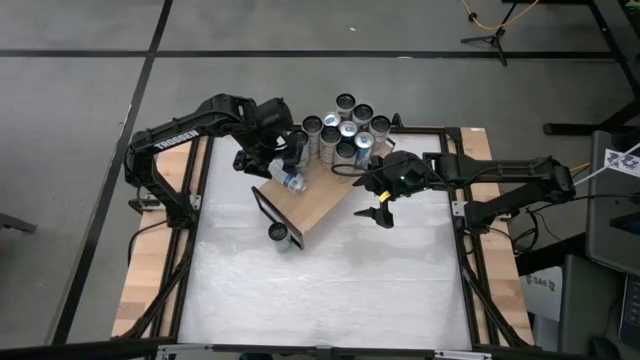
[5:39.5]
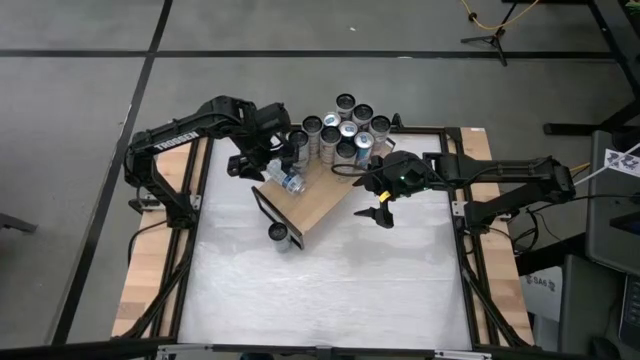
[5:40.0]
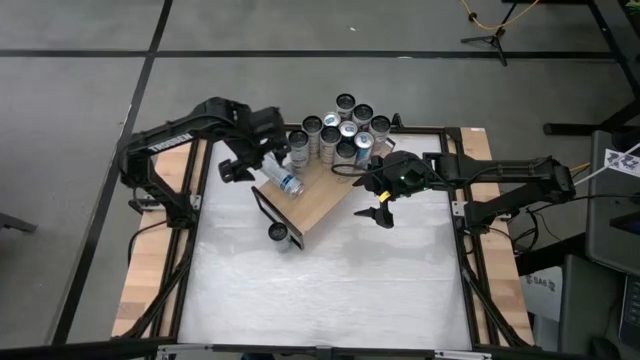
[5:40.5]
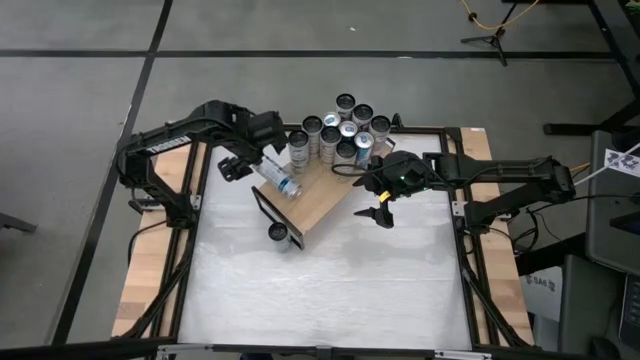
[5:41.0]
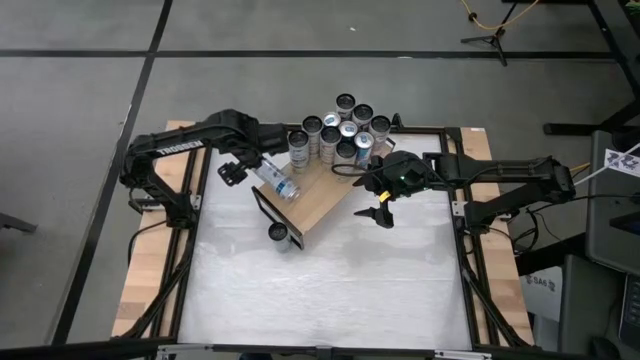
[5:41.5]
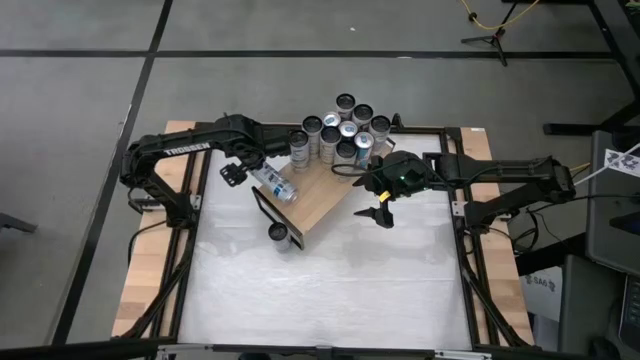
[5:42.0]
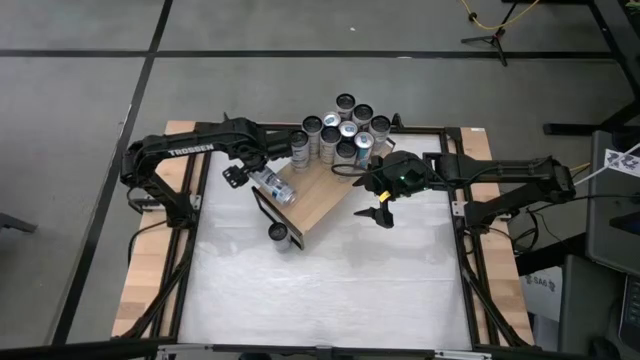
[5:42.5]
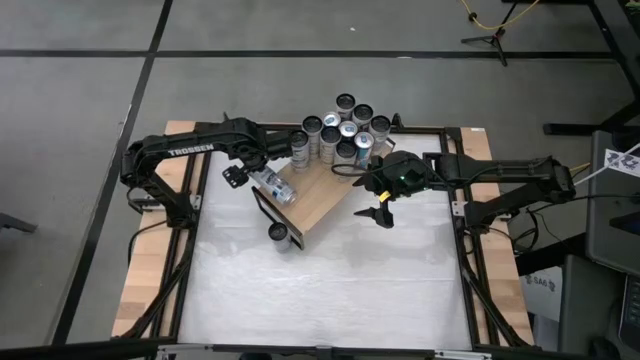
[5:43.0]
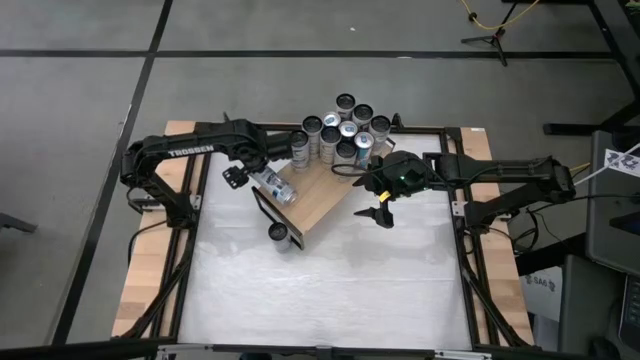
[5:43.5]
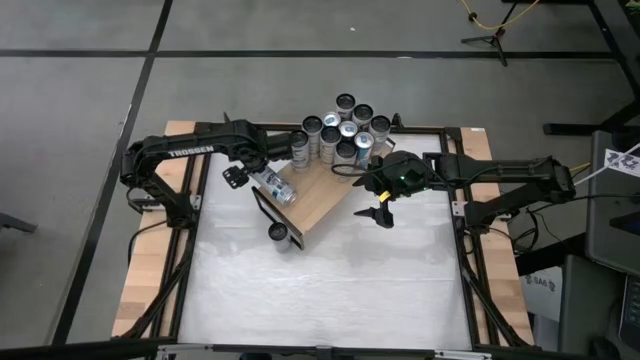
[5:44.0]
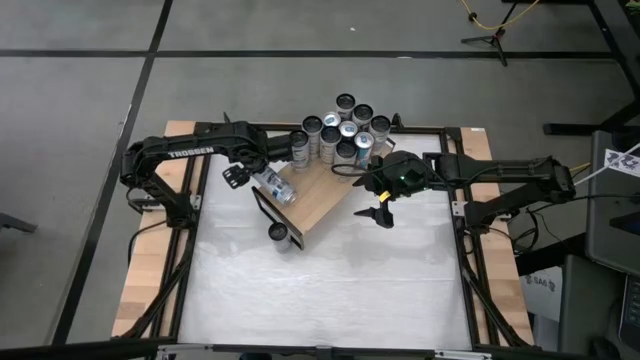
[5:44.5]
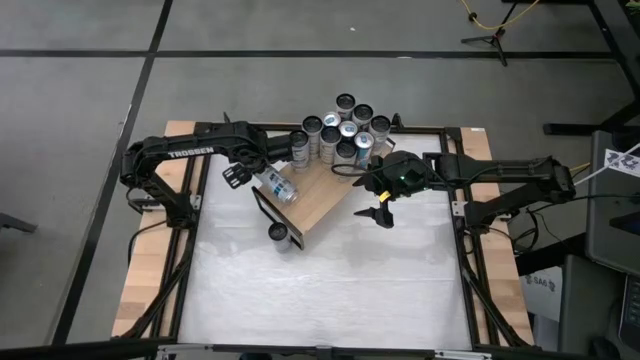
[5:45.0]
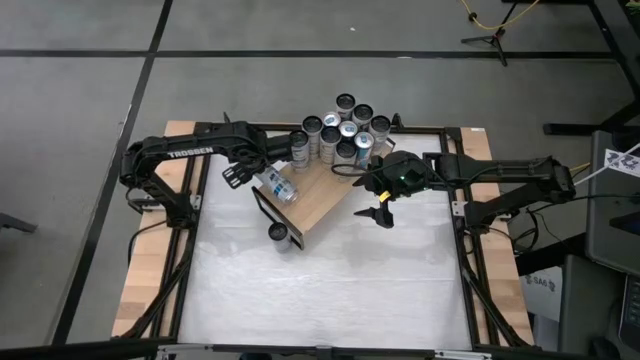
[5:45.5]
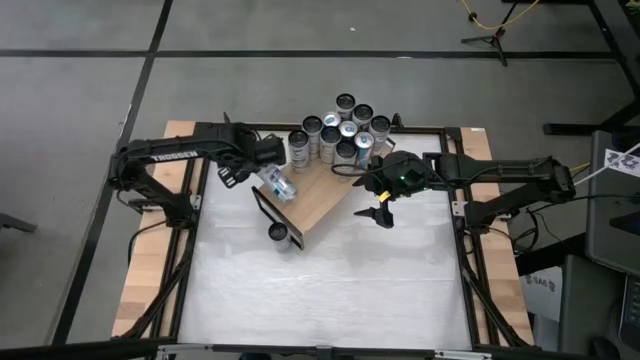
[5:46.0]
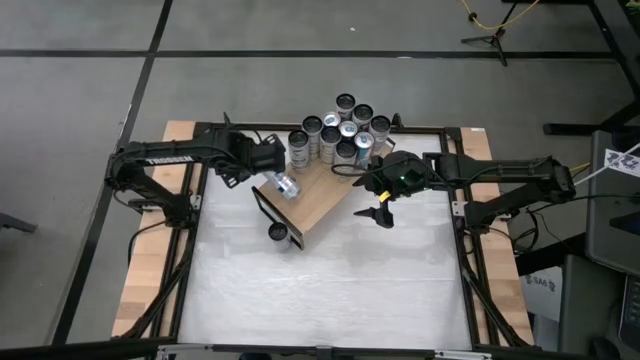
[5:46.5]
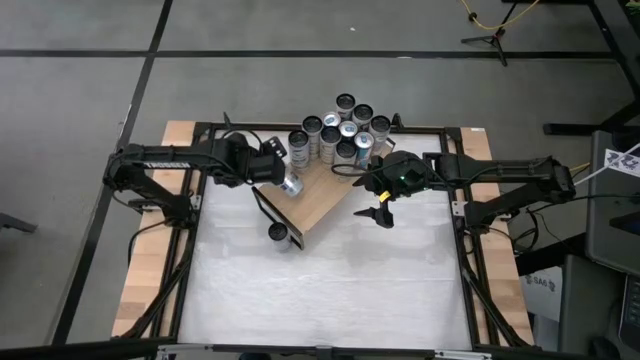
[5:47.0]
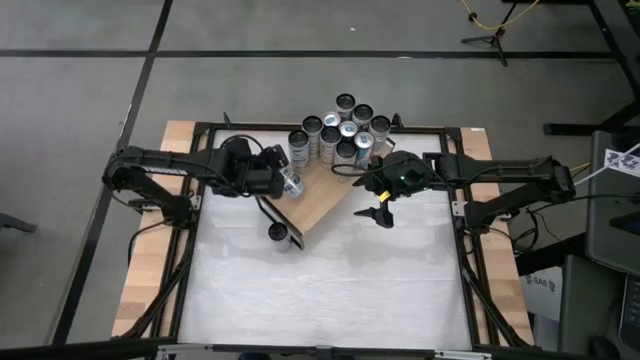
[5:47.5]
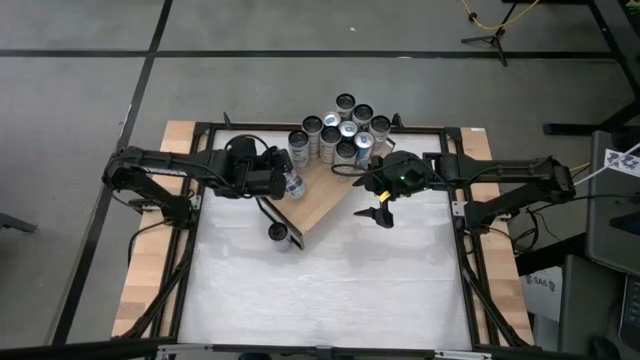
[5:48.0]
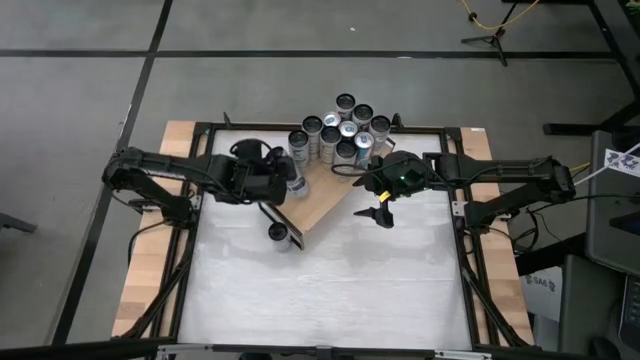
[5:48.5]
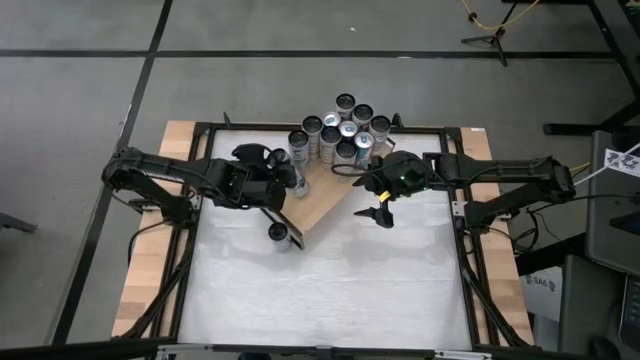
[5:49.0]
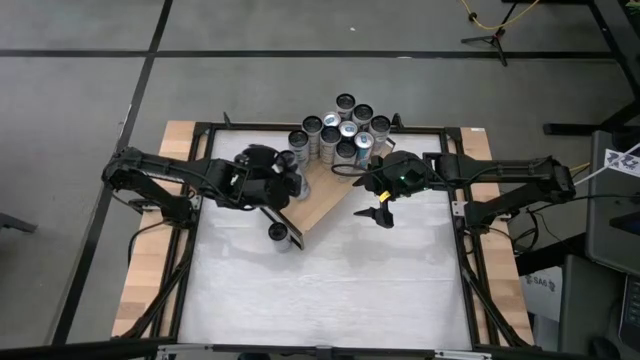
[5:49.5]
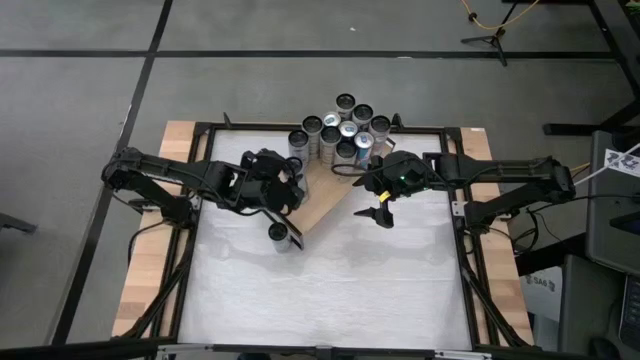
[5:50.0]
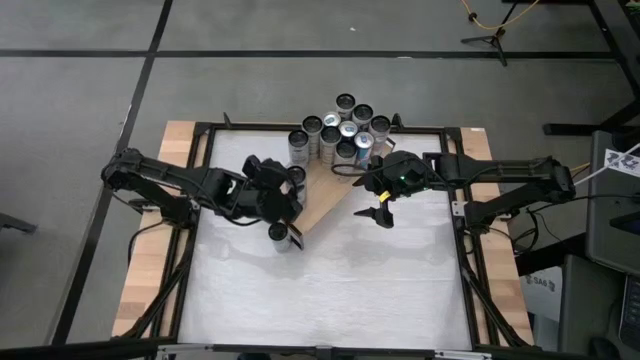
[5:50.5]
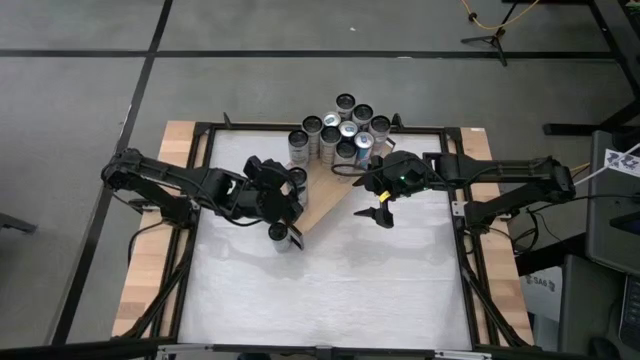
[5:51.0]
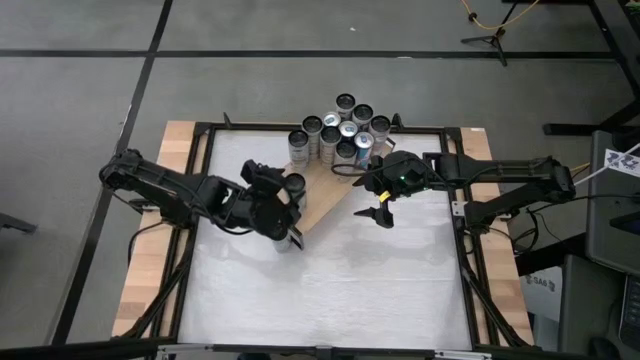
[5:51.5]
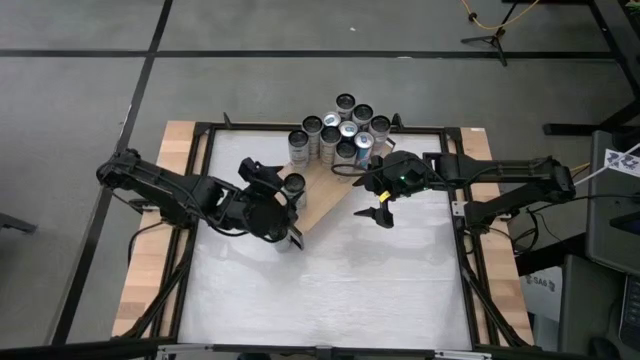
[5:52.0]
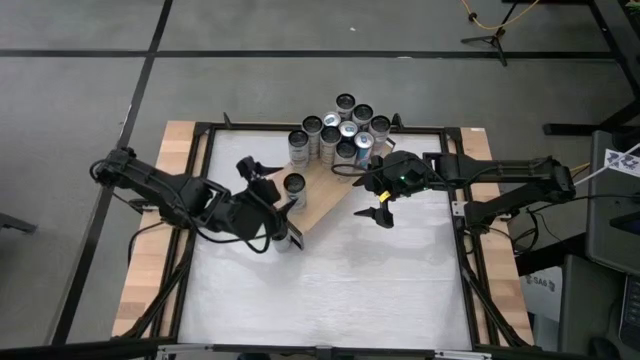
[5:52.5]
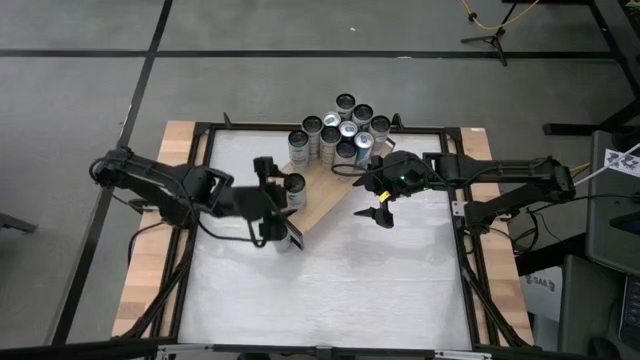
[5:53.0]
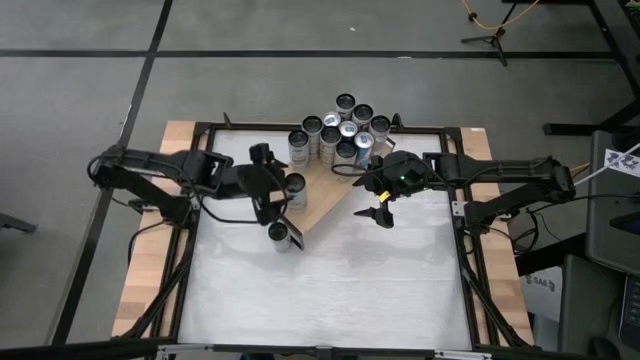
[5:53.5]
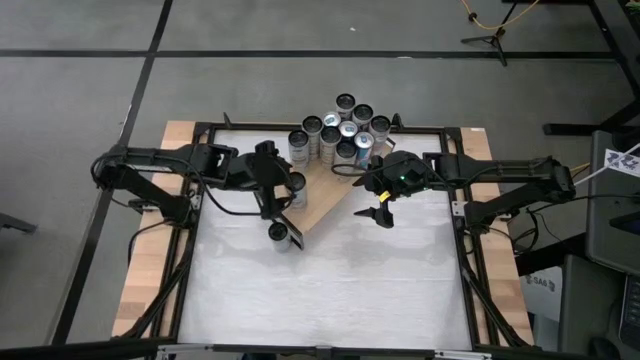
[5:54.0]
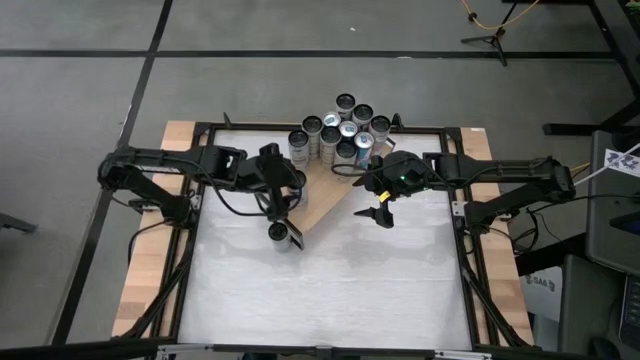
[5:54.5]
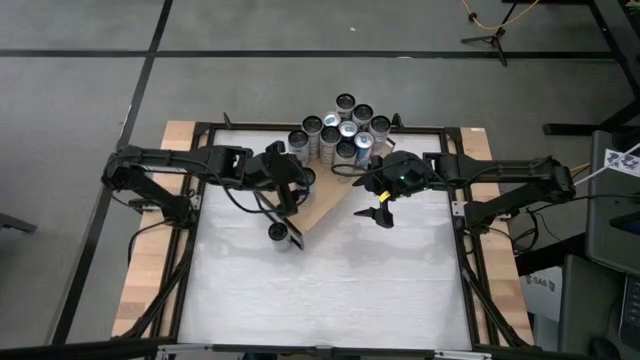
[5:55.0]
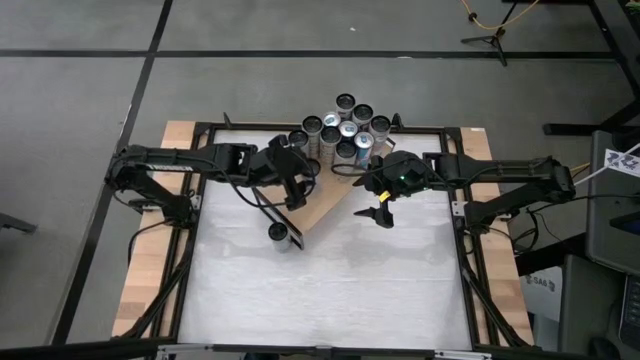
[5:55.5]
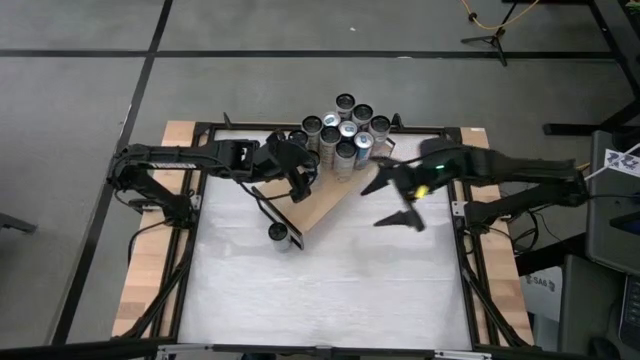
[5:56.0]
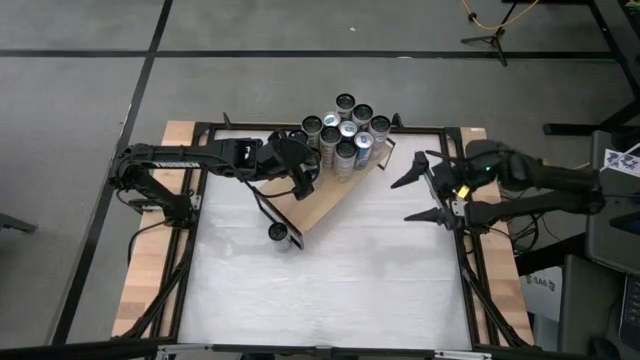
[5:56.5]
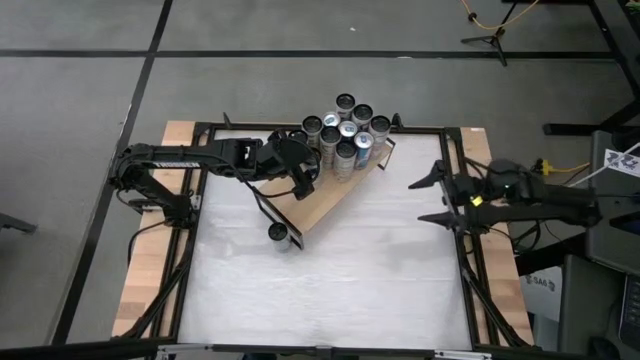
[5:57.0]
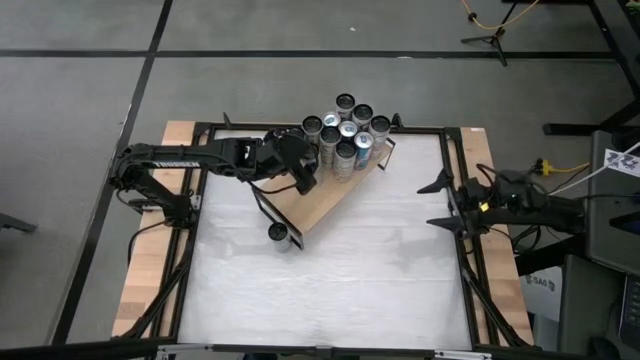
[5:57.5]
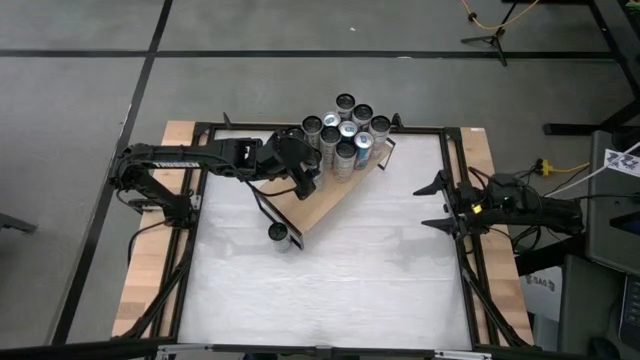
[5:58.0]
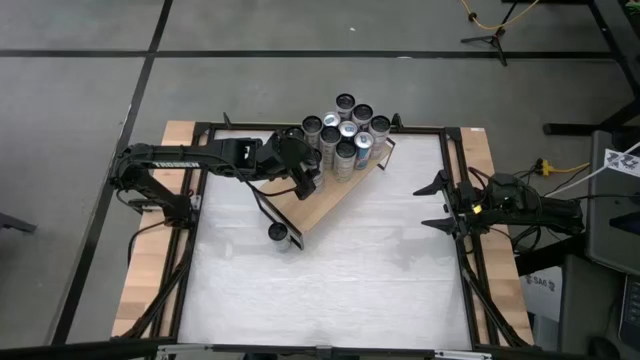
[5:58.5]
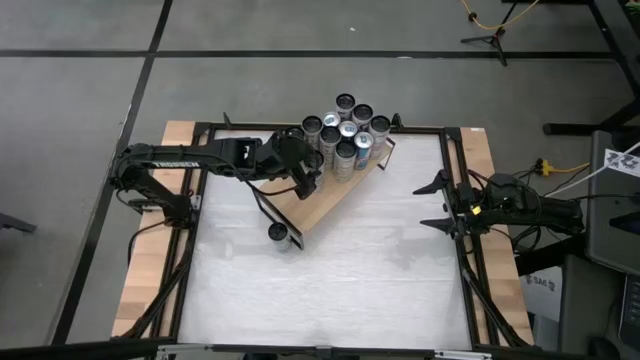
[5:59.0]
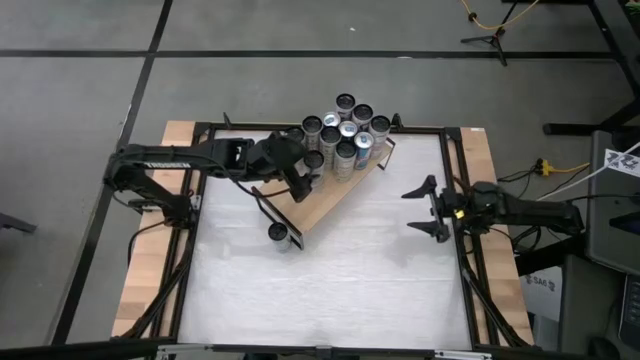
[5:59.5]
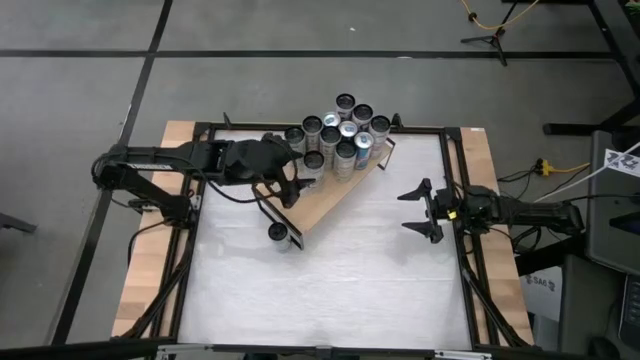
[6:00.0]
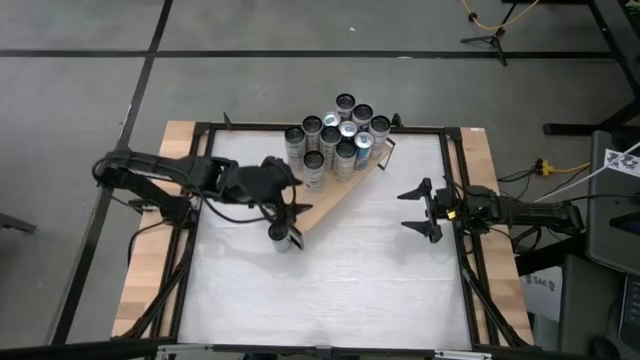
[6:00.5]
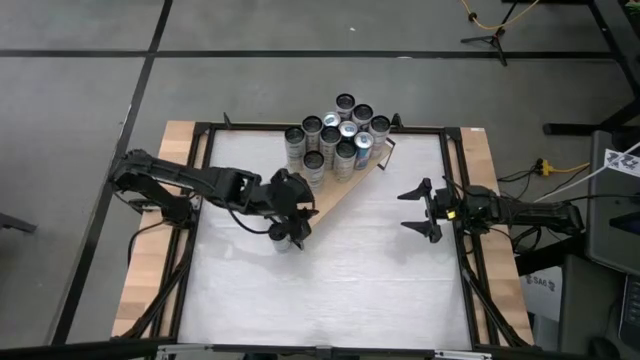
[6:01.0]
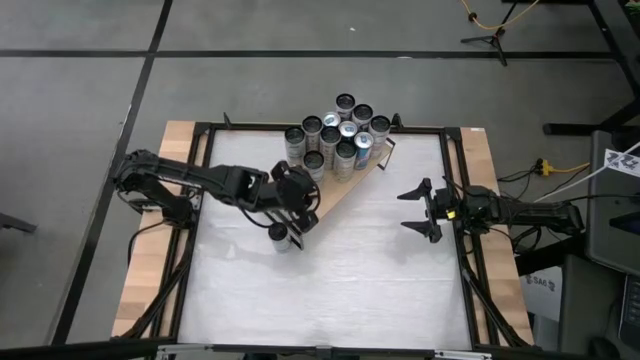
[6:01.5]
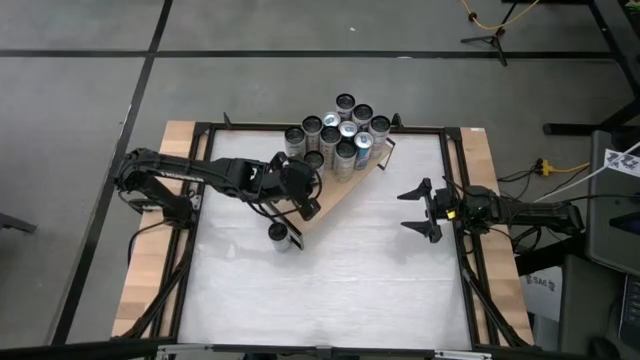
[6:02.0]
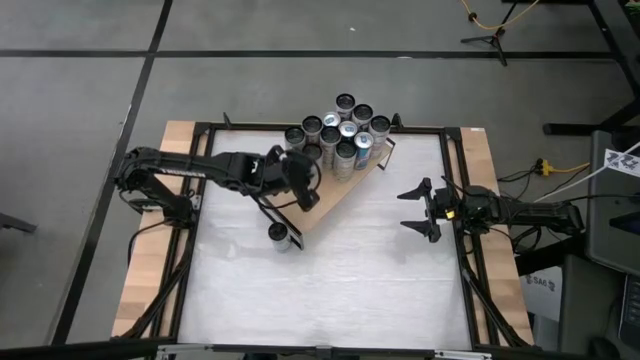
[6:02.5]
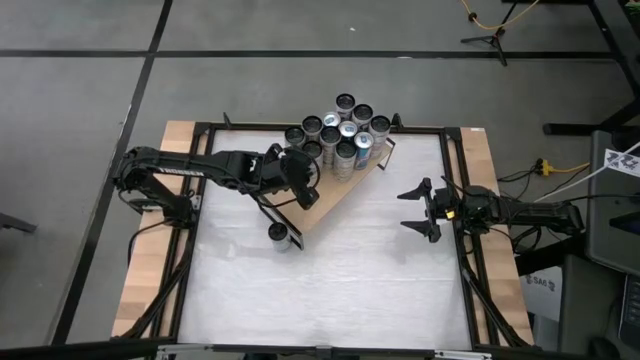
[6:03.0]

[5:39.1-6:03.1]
Task: Place canned beverage on shelf
Put the white-blue soda can on the shelf aligned with the other white-blue soda can
